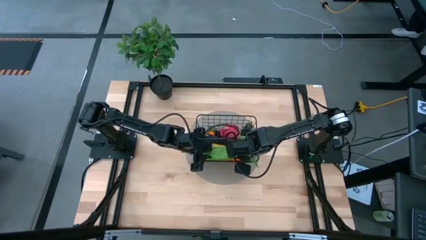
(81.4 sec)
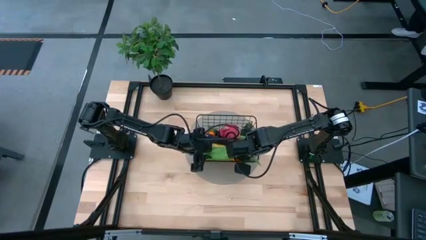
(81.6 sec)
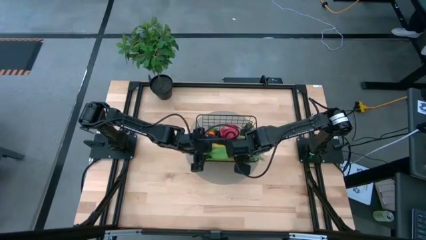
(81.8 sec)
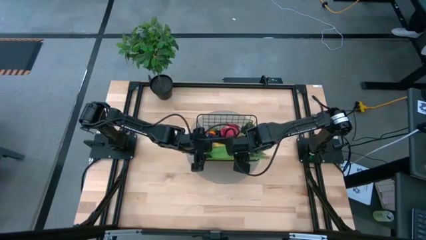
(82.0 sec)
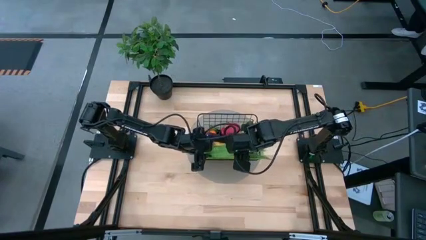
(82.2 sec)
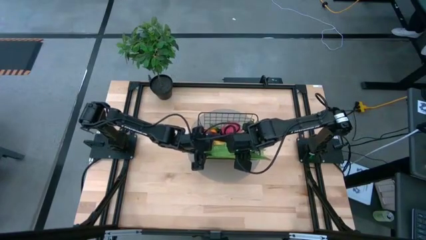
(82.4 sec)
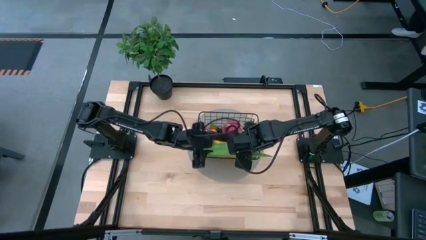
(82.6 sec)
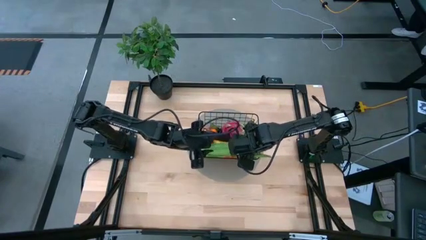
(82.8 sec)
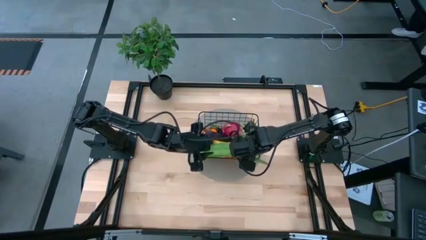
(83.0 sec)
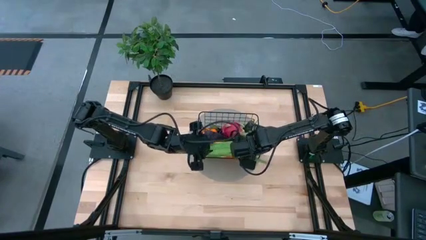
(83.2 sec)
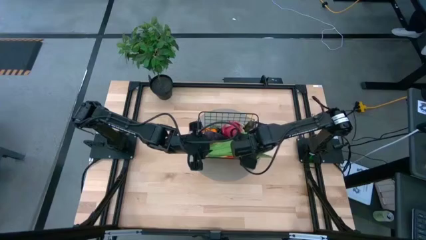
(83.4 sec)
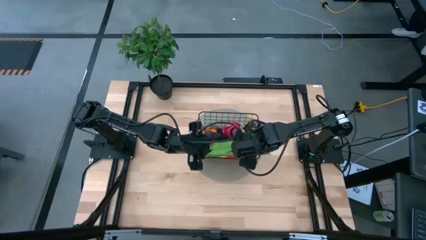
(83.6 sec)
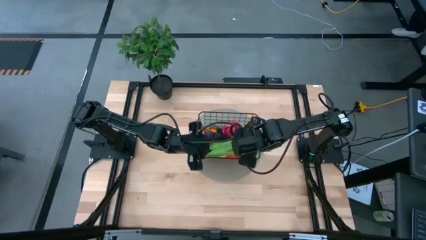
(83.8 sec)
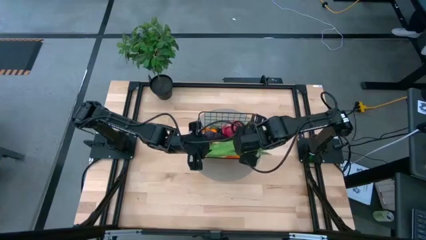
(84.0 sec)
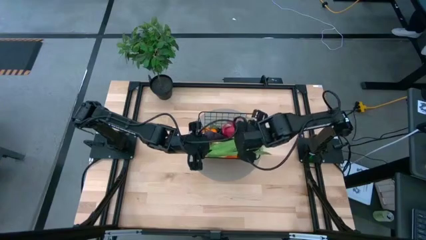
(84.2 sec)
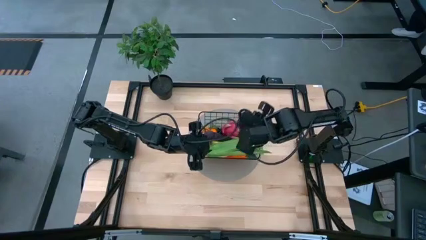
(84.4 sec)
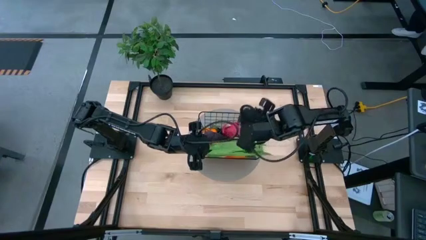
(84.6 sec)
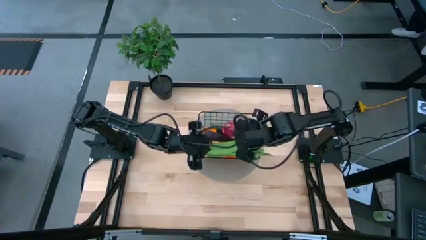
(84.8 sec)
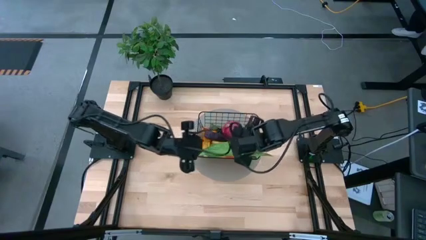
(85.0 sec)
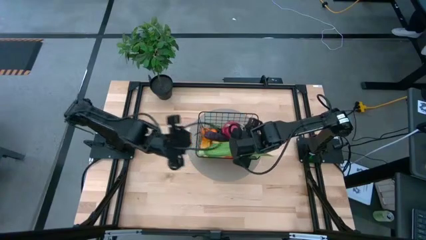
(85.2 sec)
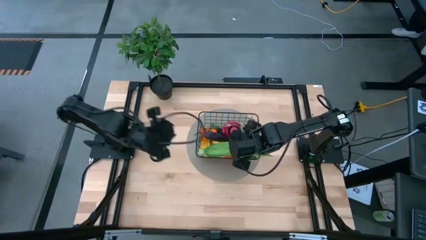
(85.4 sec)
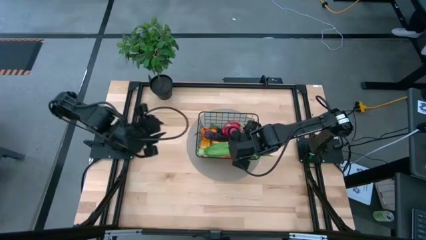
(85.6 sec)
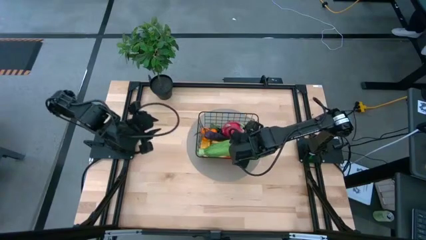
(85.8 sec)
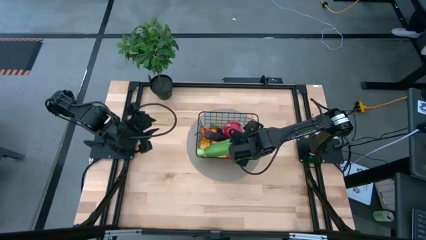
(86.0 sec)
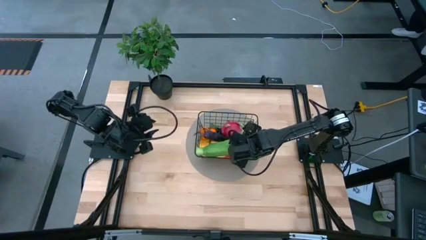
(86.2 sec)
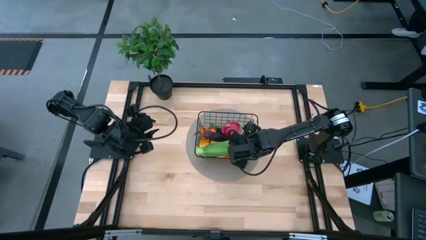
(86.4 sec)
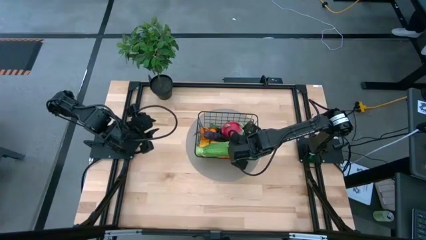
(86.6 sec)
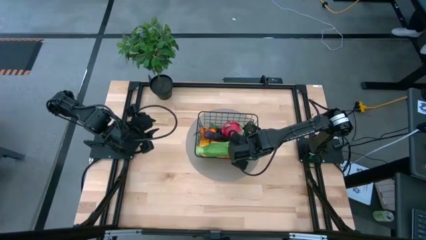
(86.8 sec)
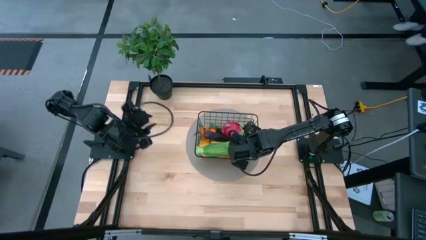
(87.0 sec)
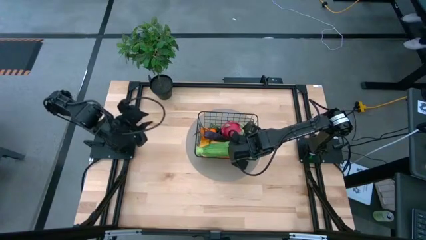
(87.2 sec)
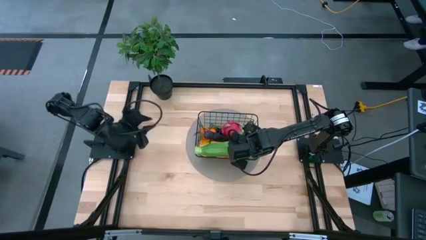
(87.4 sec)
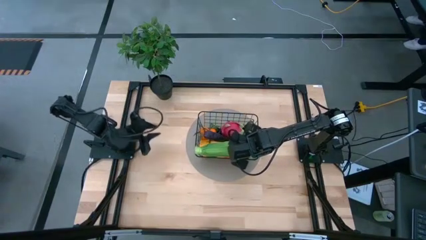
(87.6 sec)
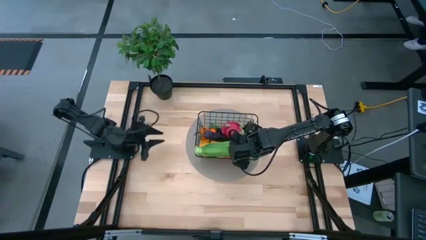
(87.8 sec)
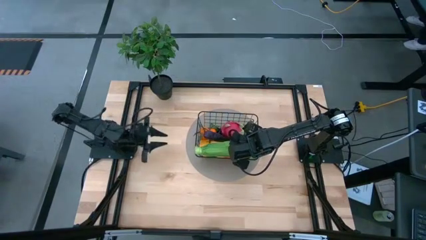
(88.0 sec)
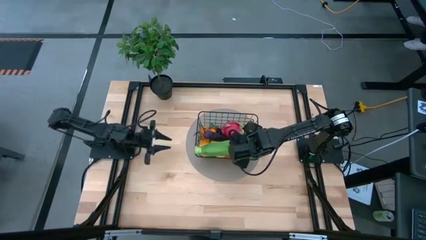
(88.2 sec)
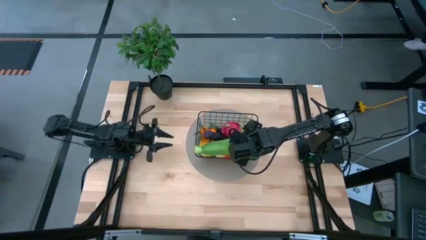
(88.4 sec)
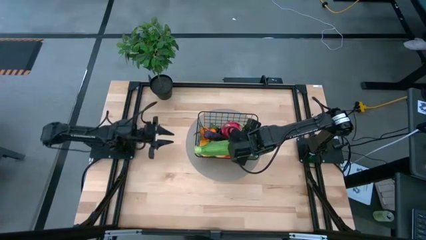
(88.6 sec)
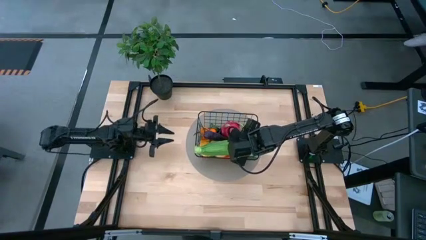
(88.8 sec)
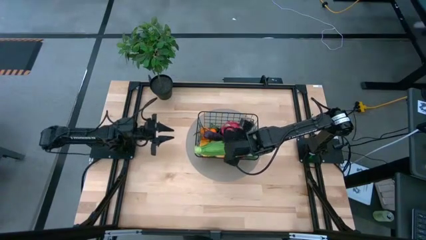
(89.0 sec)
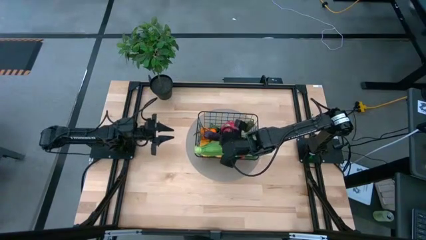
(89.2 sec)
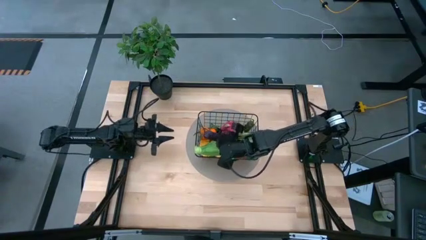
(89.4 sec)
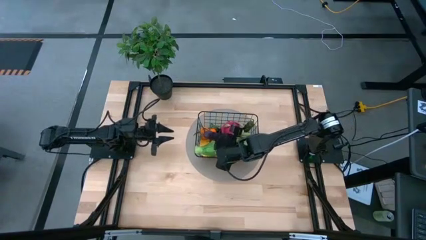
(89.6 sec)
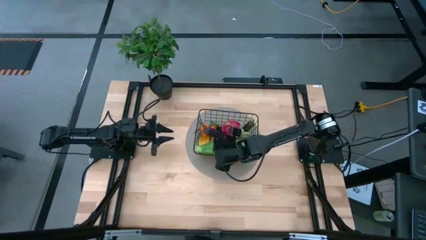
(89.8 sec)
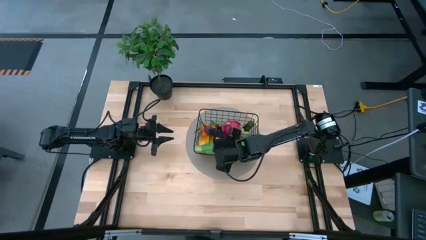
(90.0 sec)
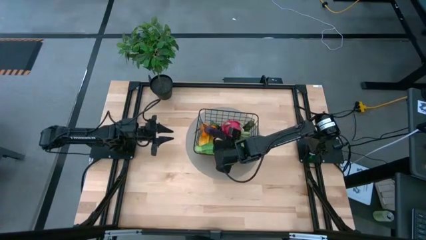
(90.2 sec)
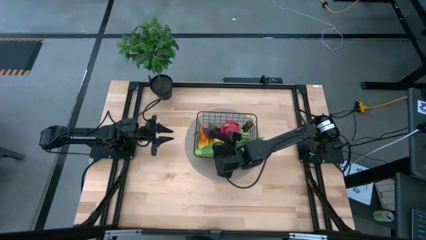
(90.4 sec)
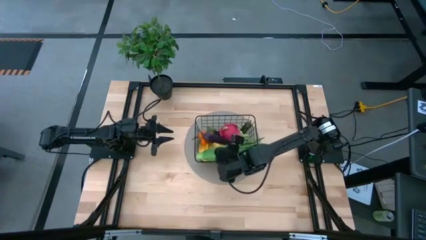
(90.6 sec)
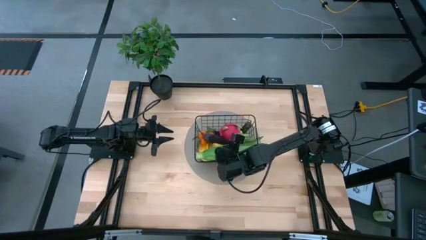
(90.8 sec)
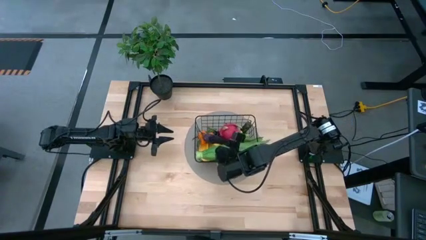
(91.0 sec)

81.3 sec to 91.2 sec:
Task: Build produce basket
Put the green leaf lettuce into the black wire basket

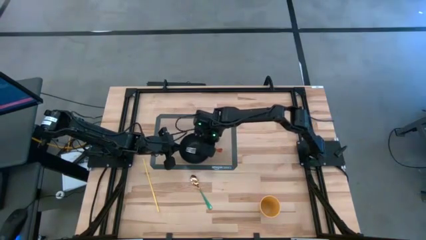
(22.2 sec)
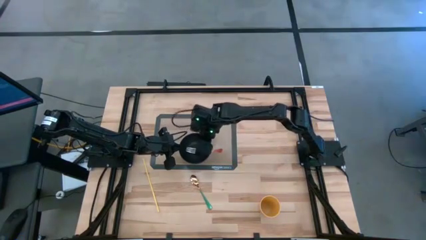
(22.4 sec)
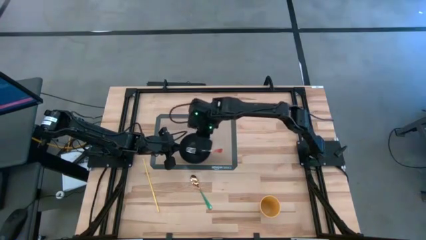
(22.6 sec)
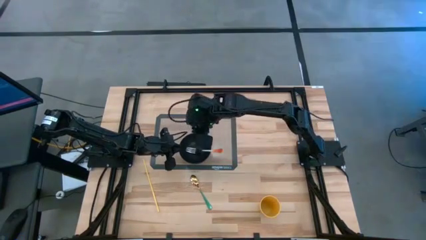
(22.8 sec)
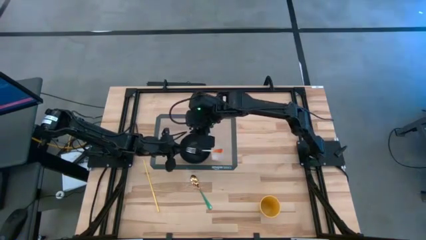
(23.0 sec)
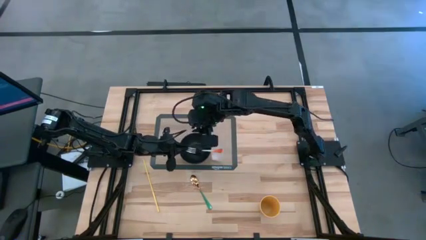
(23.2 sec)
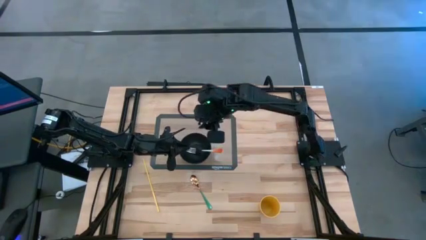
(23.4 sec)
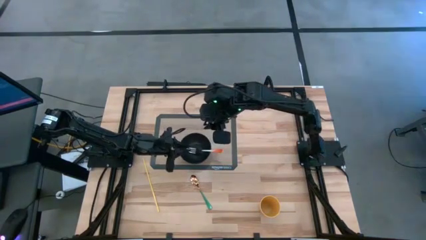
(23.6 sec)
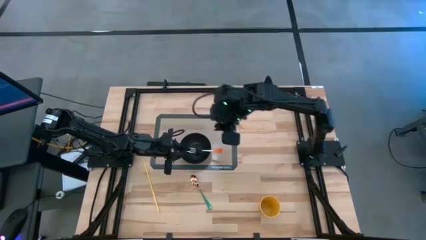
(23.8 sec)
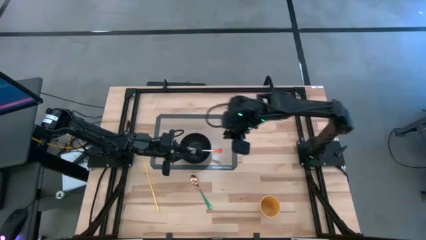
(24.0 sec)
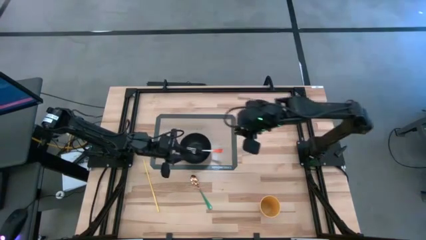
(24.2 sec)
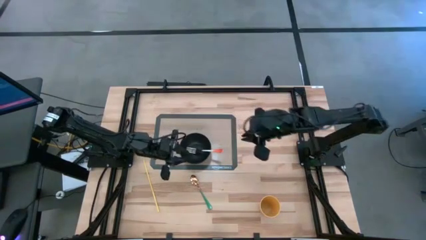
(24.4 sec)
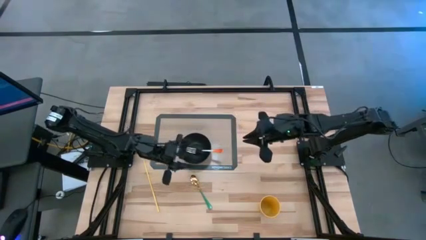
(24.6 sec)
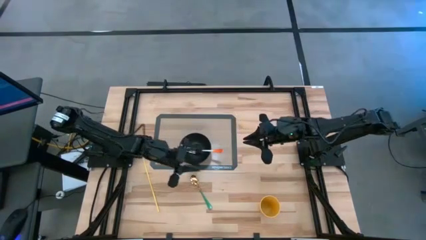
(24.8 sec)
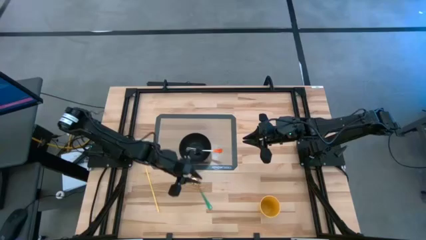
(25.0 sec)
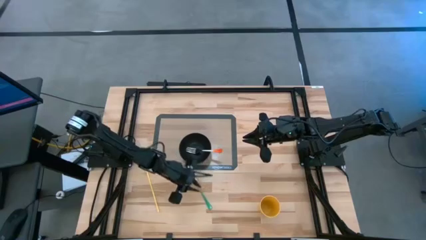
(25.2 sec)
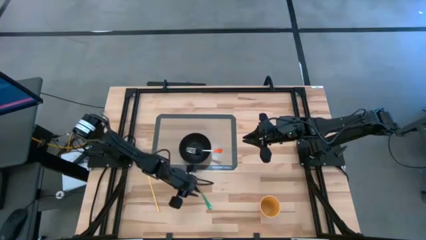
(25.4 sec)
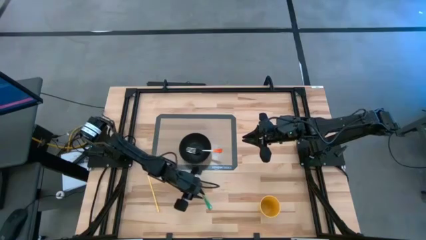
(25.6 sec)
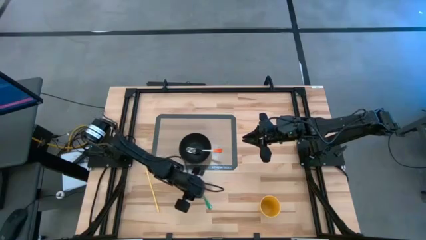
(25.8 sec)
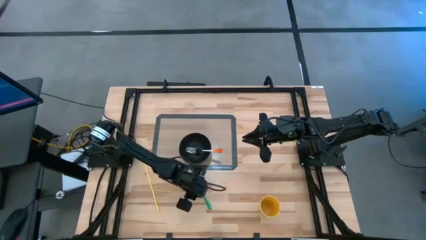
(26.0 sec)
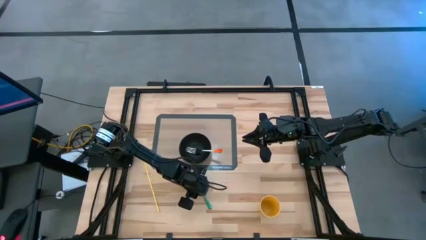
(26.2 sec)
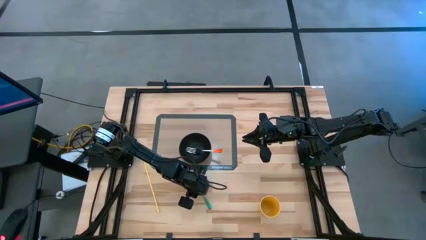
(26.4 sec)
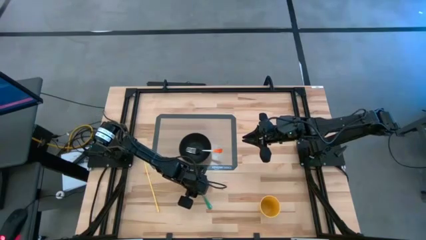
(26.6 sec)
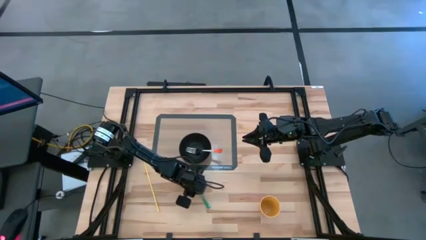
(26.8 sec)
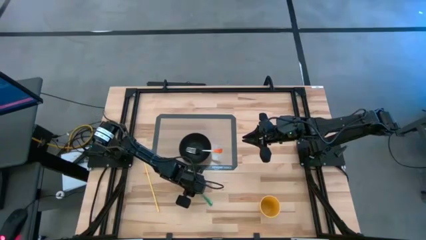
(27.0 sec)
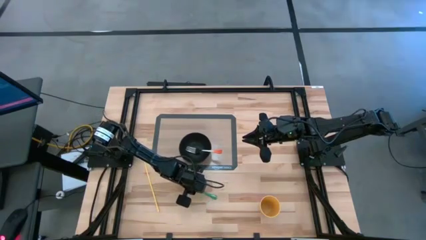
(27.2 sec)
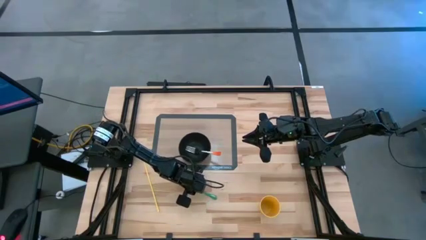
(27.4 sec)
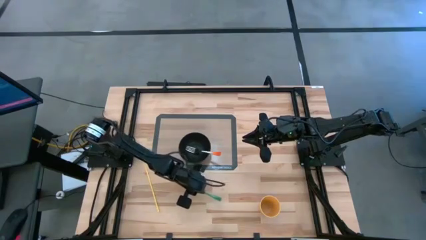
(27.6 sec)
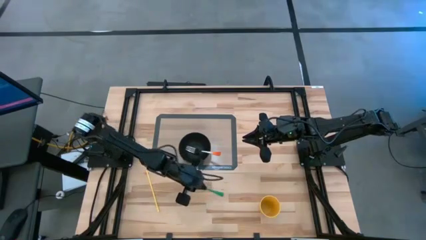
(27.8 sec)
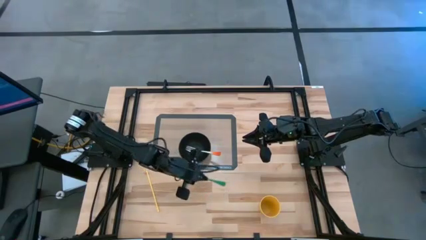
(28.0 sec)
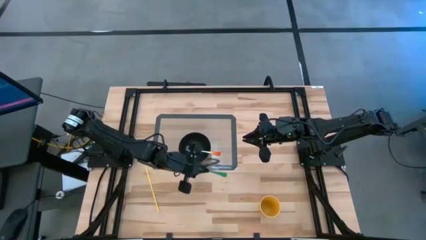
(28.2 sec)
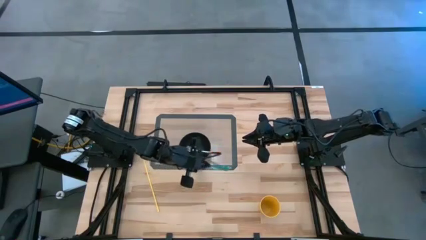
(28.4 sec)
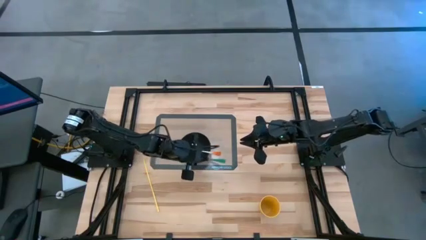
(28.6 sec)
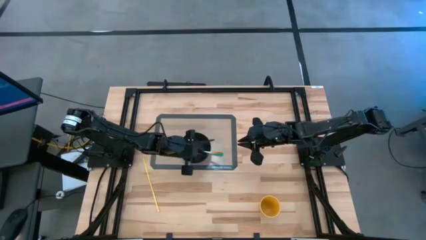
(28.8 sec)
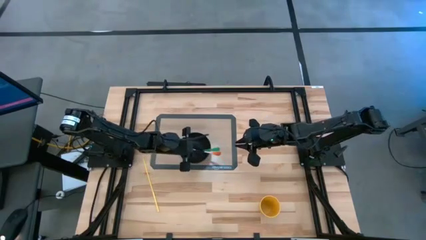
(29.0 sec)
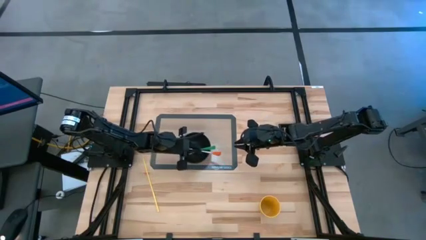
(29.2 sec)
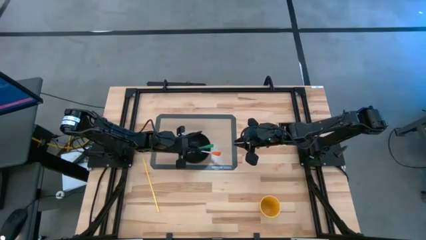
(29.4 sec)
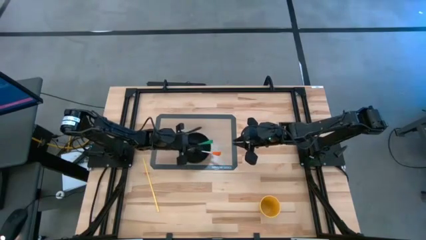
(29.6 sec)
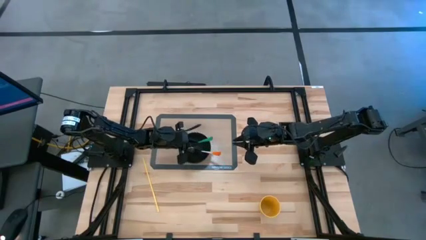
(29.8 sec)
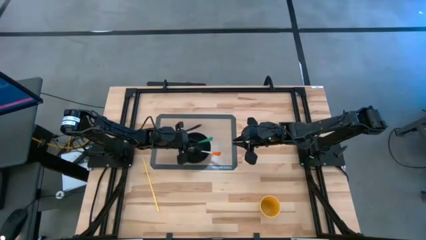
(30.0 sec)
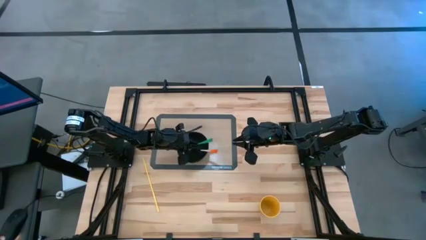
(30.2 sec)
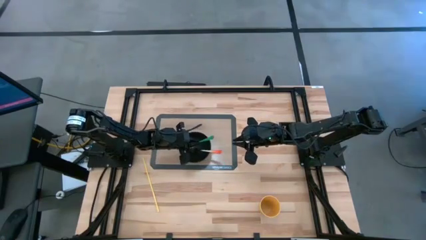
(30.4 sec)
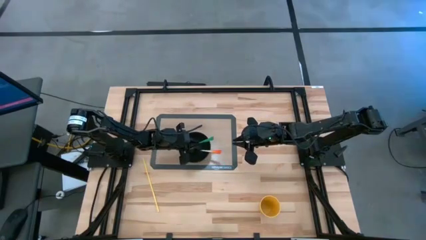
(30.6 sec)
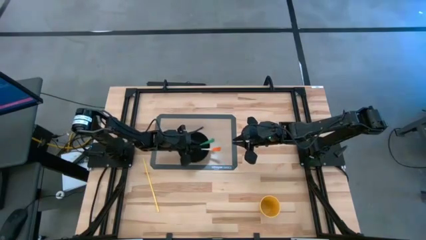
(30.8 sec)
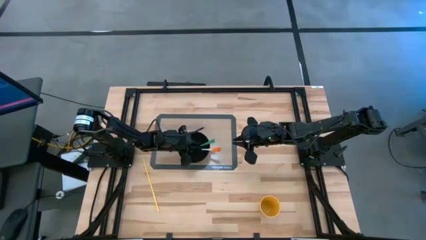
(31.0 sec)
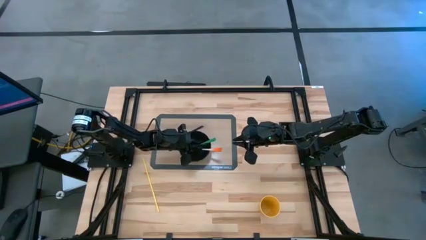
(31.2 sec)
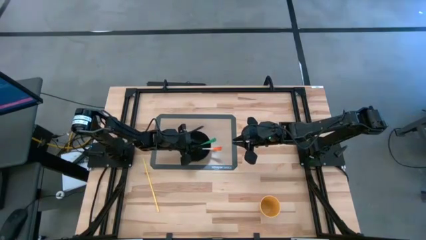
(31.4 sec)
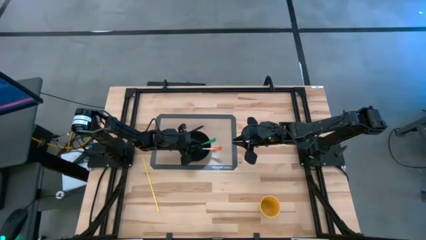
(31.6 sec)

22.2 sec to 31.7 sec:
Task: Pick & Place Utensil
Put the green spoon into the black bowl on the transparent mat
